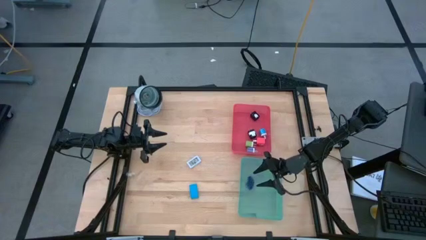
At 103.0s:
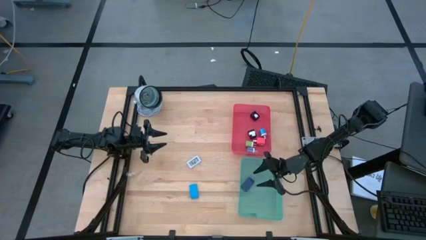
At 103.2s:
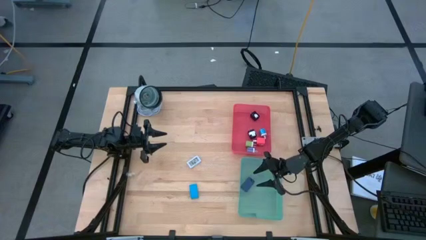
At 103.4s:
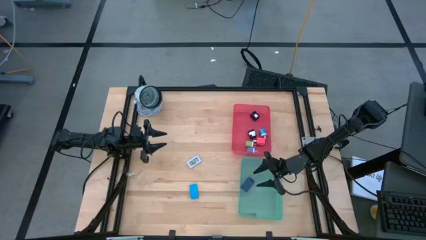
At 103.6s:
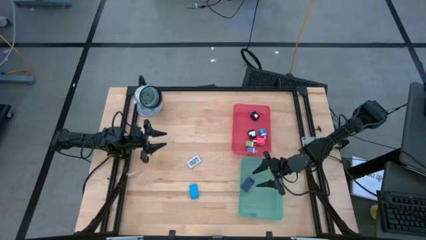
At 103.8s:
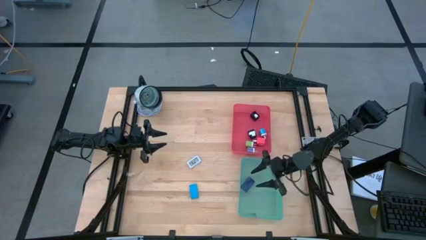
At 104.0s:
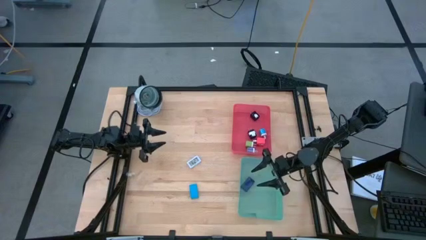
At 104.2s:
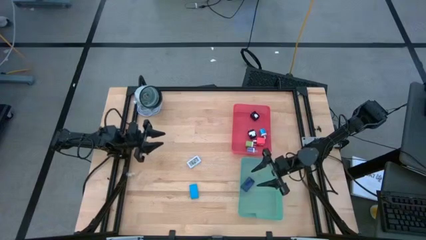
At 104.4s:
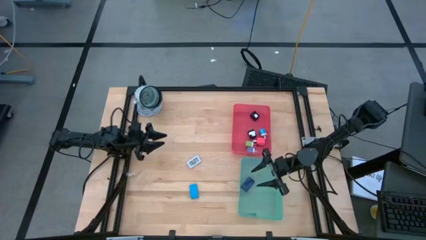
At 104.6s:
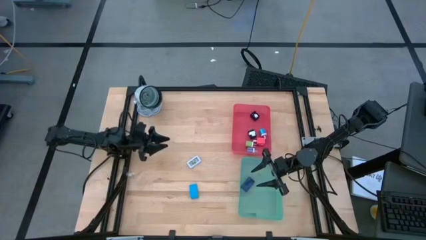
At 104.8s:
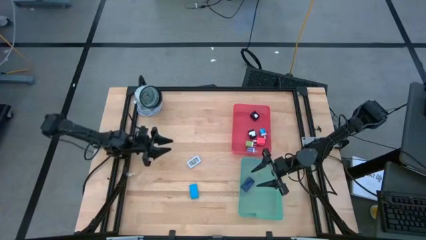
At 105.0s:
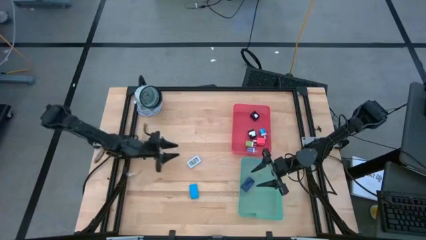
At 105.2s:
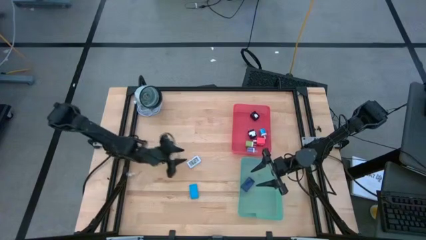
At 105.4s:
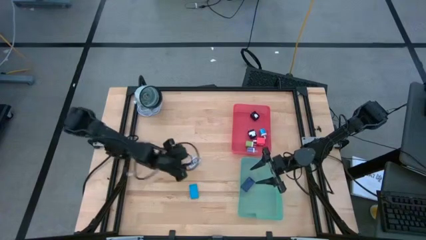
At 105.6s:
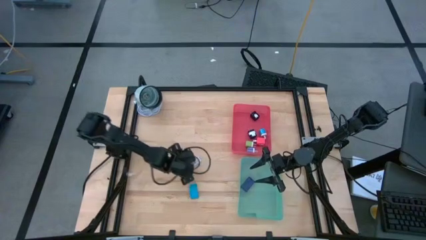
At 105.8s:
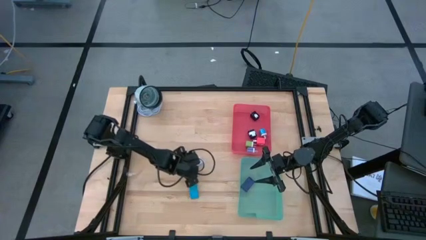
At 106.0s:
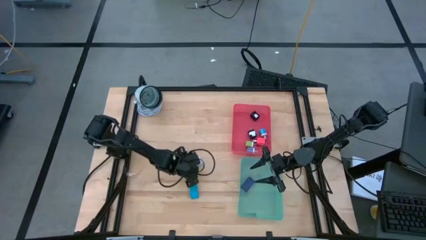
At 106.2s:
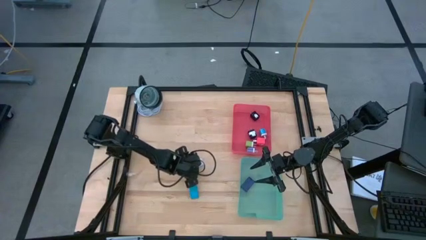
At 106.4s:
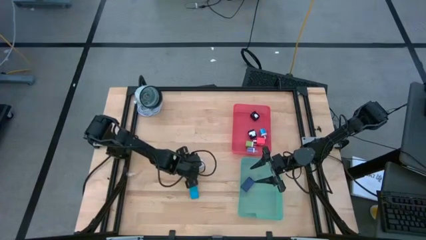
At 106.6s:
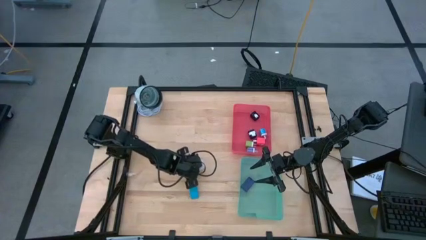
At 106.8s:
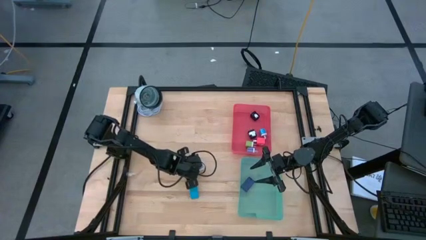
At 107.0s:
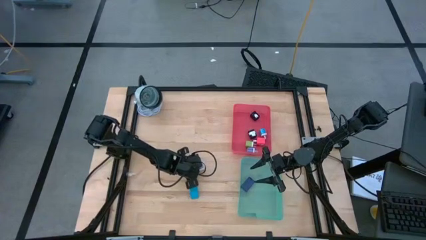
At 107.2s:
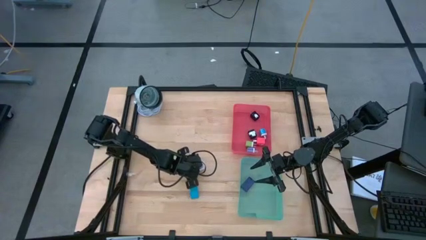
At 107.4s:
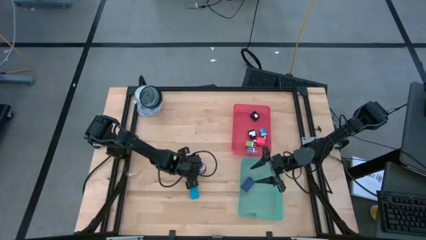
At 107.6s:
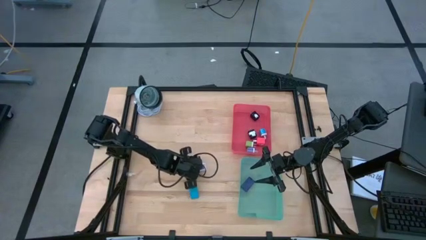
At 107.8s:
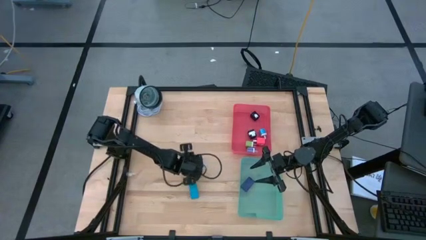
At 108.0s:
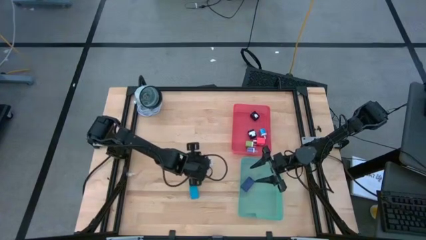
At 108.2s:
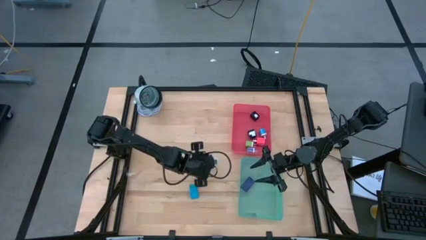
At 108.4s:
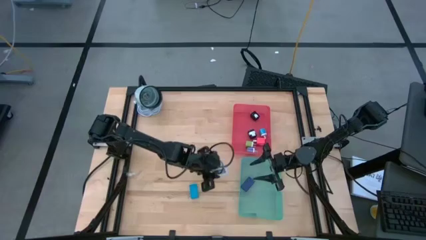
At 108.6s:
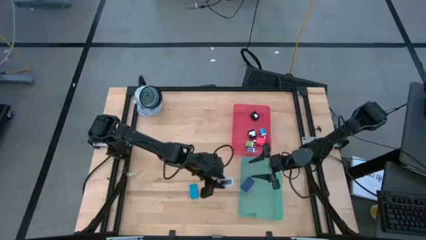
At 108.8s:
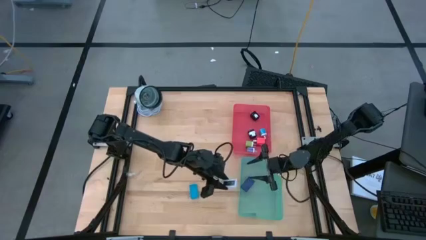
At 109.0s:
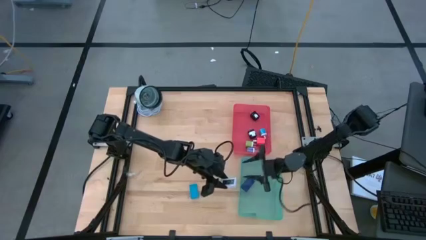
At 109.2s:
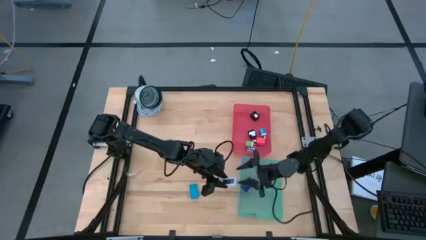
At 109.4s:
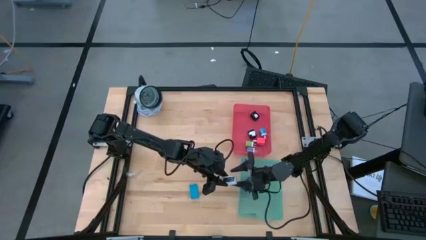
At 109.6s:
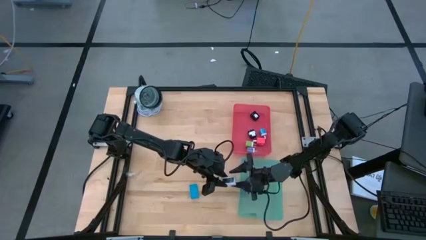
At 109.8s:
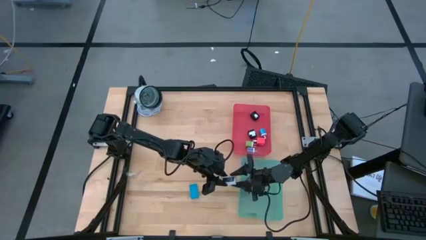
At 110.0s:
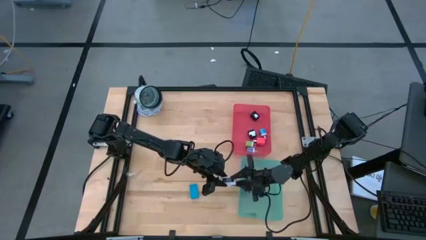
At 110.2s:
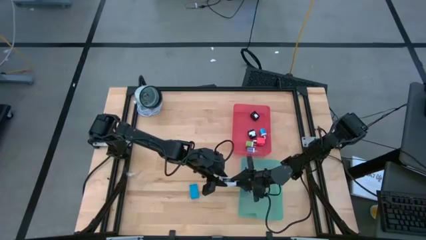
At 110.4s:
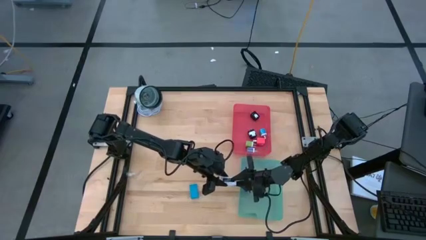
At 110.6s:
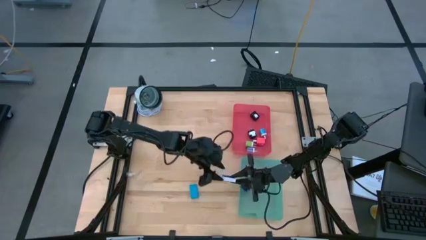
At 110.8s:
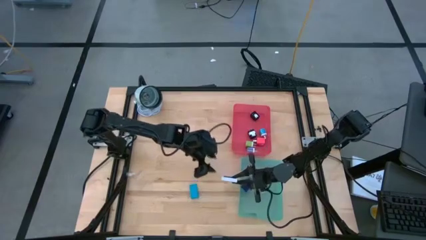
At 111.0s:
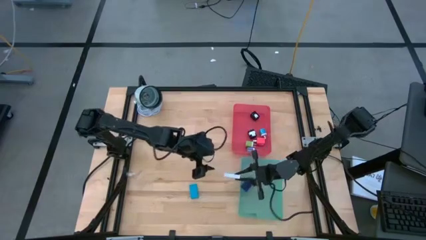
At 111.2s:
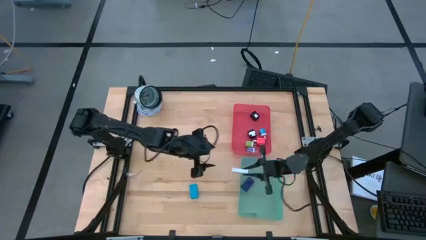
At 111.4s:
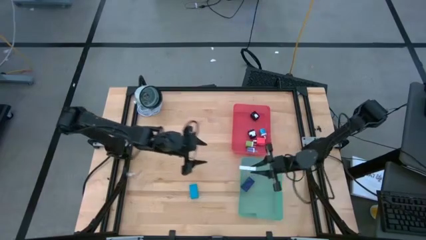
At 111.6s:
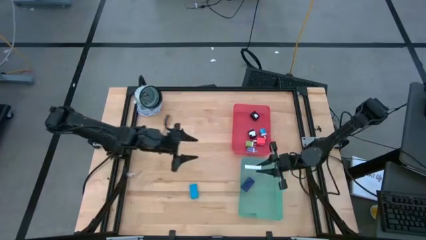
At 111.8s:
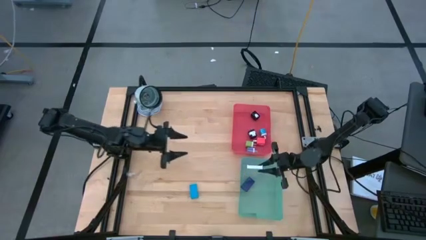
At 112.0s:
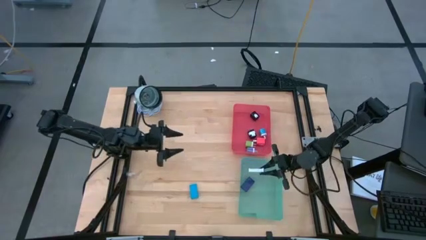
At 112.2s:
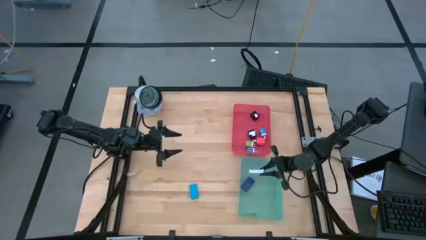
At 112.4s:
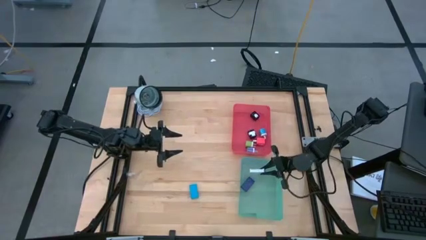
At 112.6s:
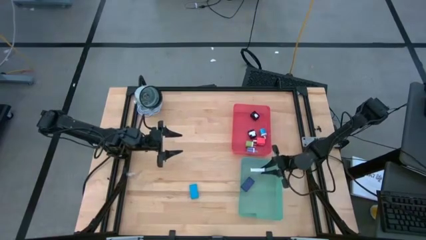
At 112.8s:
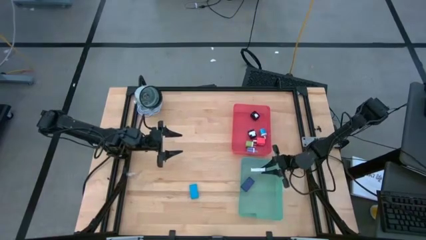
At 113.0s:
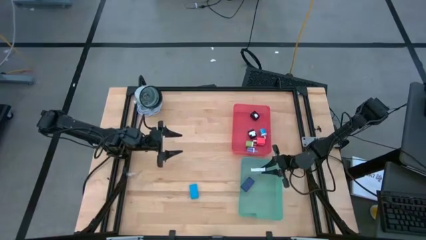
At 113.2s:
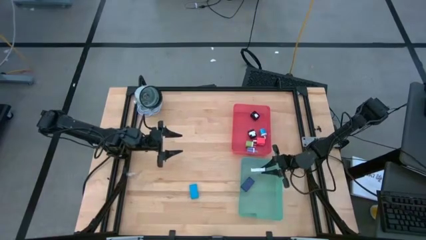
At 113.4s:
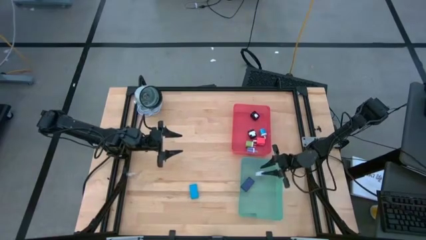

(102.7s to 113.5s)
Task: Pick & Place Office items
Put the white digital clock into the green bin

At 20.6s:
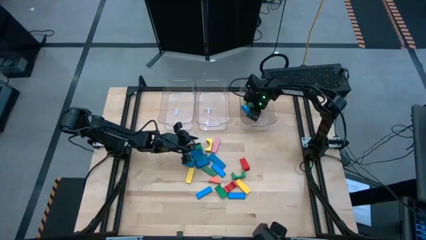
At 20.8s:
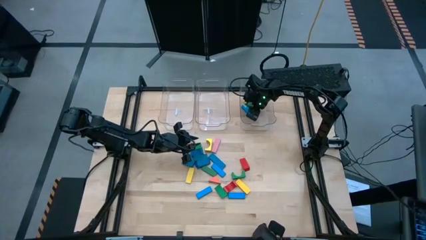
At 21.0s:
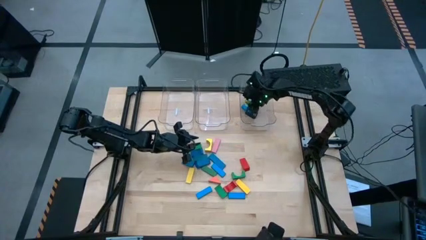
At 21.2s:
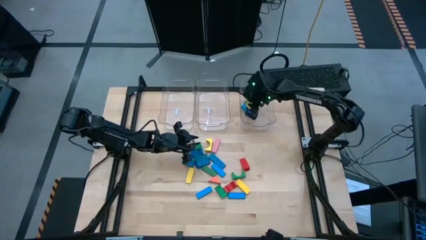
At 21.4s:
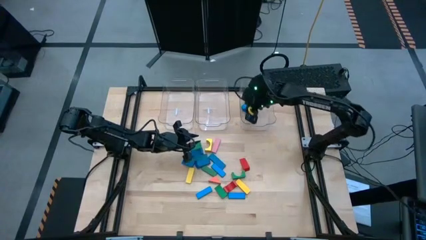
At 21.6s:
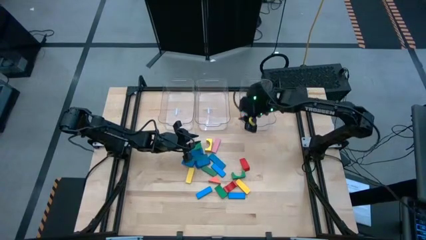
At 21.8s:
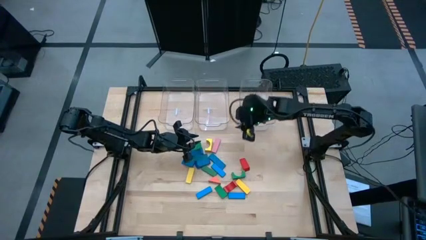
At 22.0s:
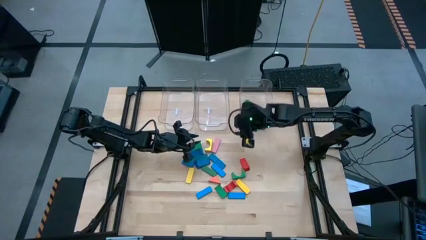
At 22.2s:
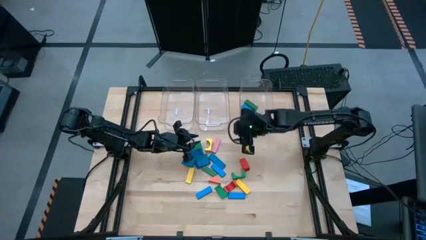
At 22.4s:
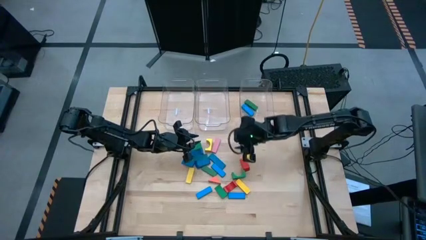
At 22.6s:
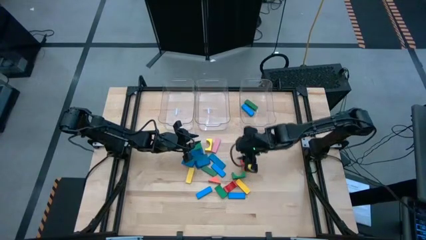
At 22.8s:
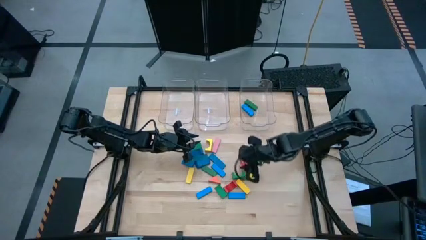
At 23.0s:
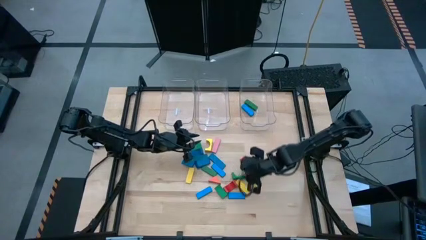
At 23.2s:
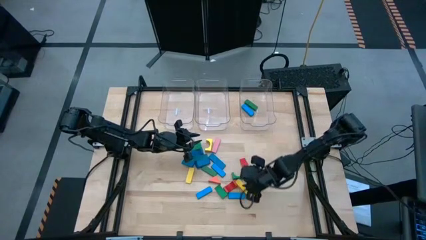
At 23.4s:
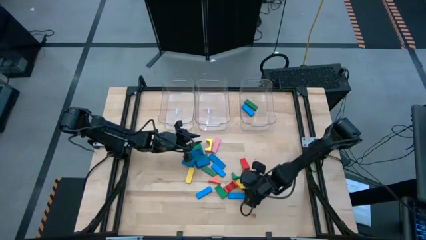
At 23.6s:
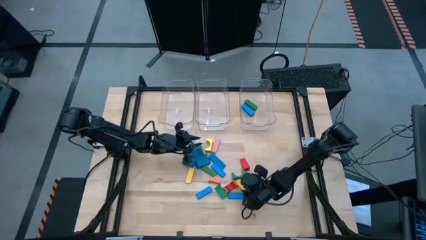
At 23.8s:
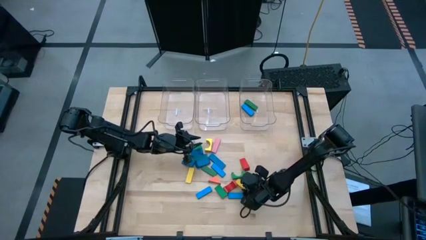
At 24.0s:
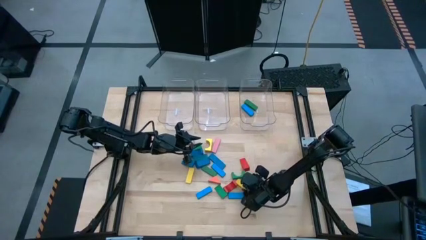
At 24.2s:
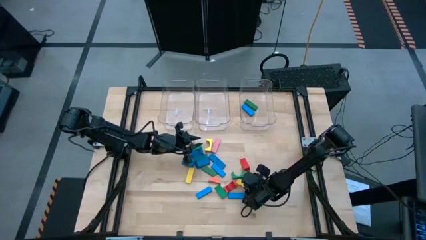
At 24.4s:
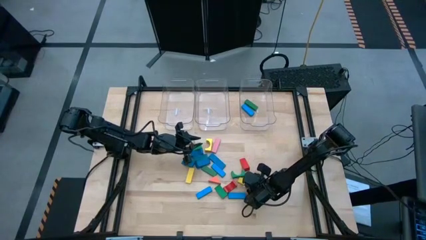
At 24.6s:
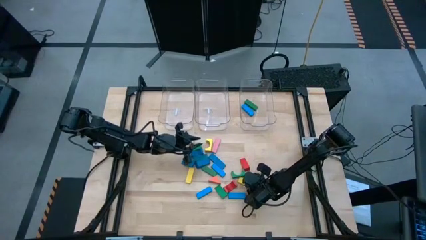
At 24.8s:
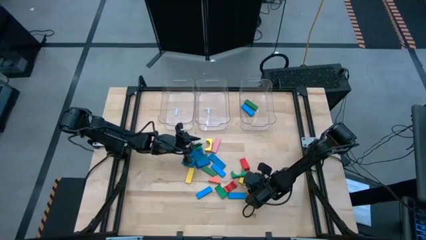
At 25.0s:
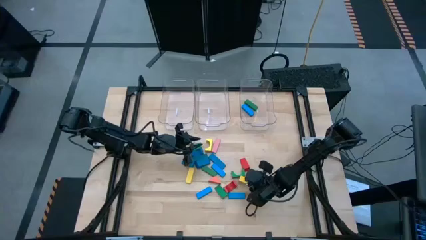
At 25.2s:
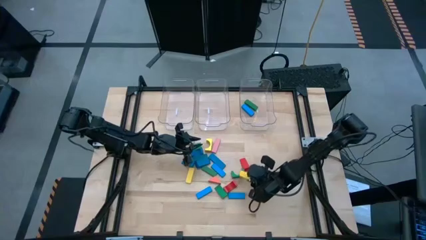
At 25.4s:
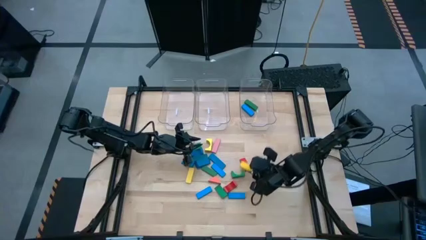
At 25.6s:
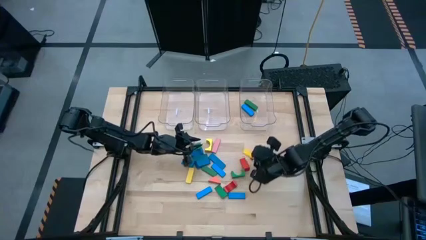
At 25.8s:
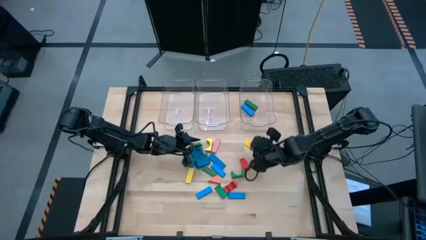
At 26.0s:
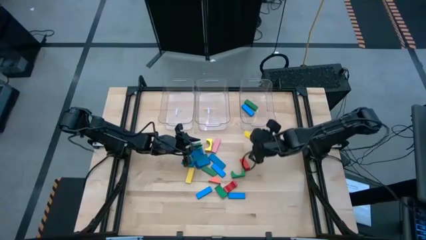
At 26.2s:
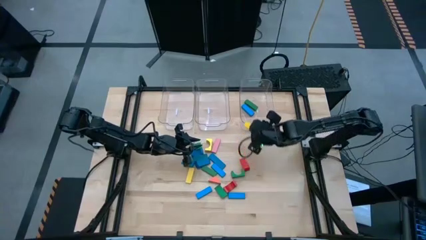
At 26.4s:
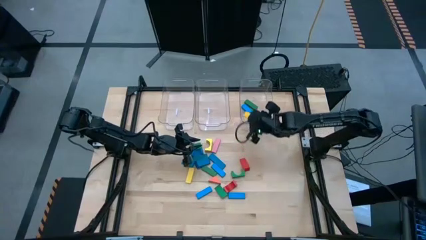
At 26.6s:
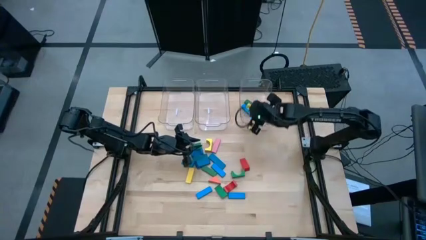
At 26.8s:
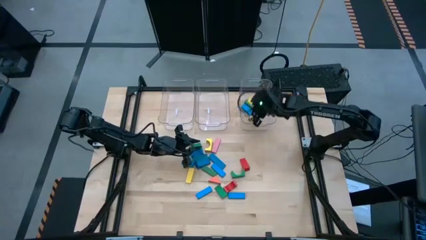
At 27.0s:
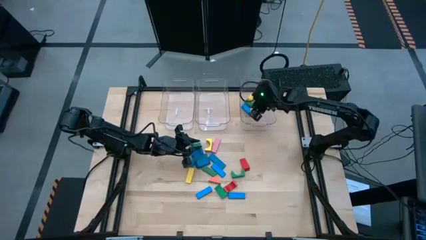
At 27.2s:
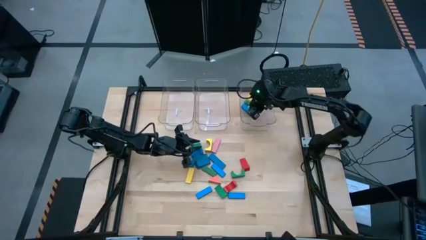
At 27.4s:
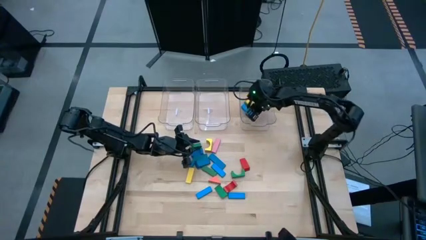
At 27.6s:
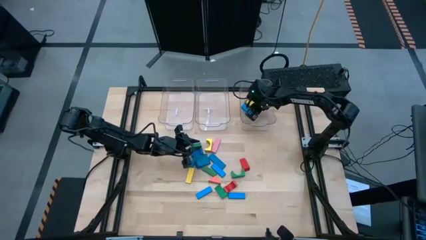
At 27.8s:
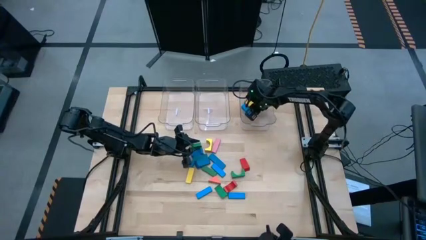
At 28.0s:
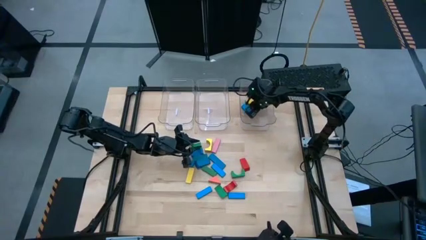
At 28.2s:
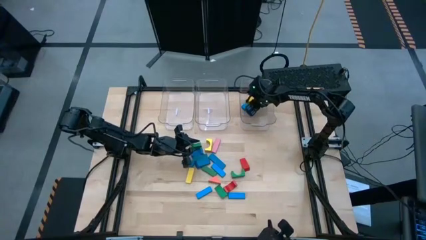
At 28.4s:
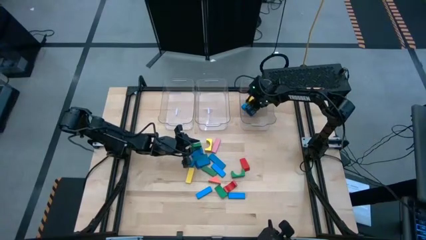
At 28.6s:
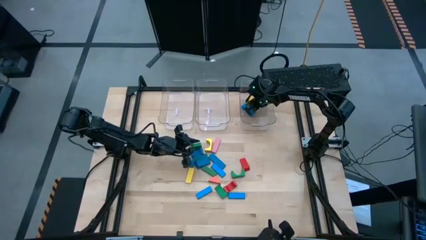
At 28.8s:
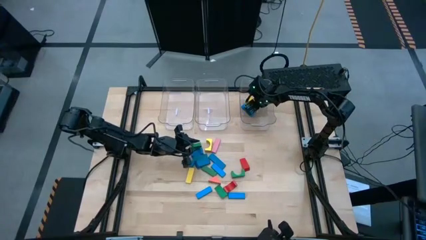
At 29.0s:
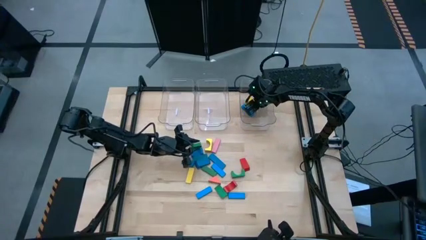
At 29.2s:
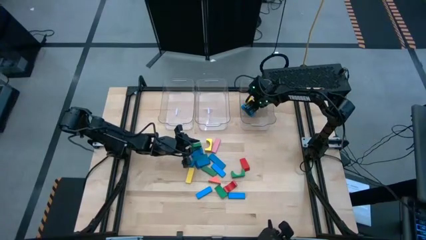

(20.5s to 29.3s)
Task: Sort blocks by size
Put the yellow rectangular block into the right transparent bin
